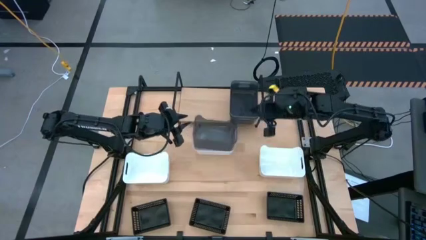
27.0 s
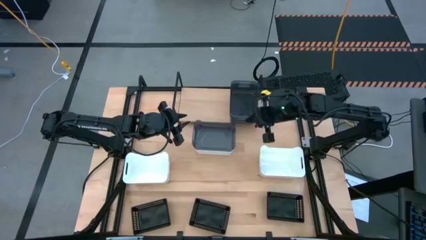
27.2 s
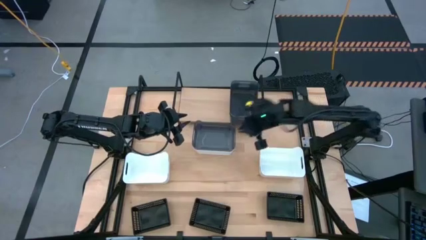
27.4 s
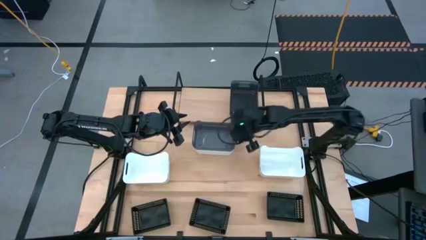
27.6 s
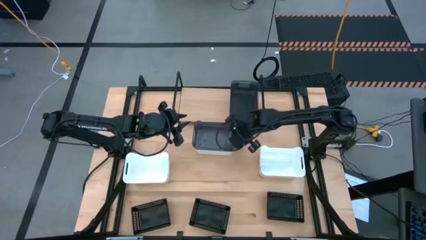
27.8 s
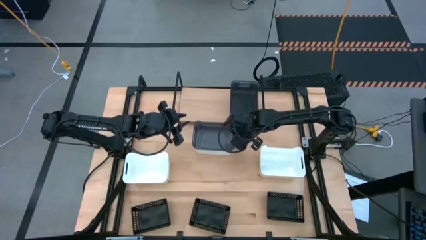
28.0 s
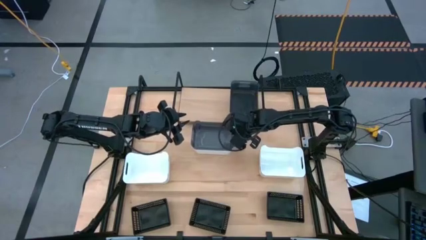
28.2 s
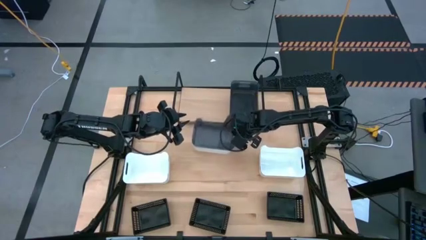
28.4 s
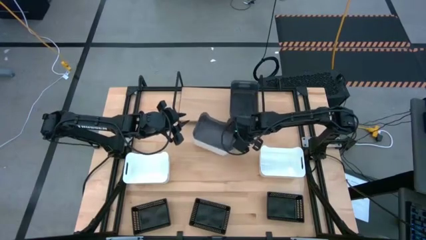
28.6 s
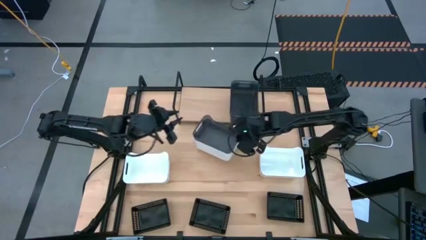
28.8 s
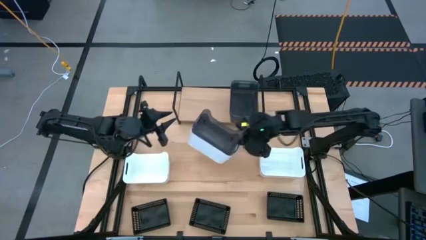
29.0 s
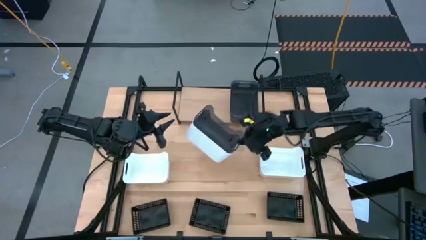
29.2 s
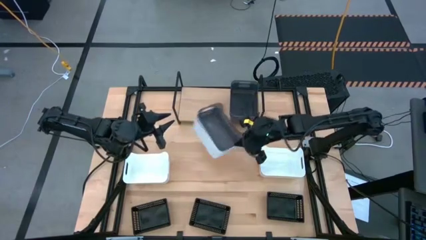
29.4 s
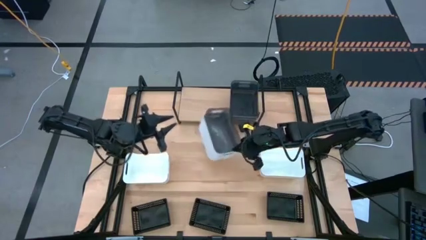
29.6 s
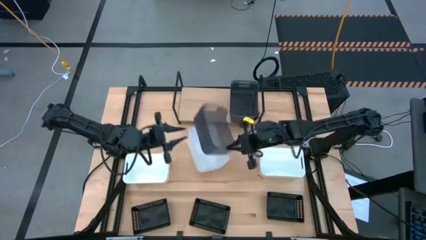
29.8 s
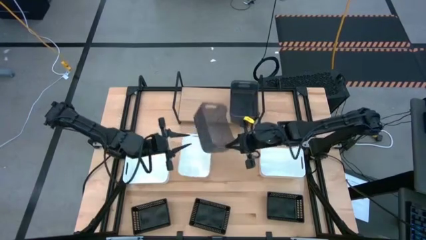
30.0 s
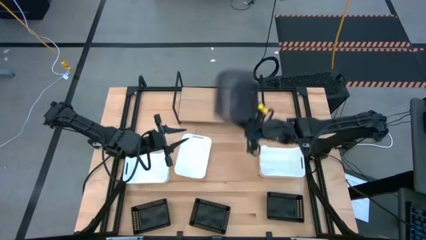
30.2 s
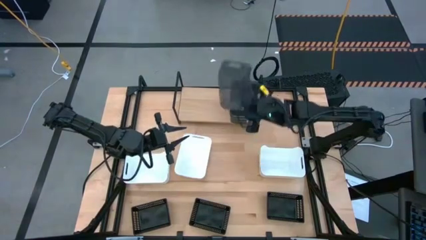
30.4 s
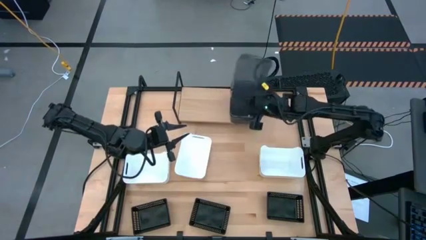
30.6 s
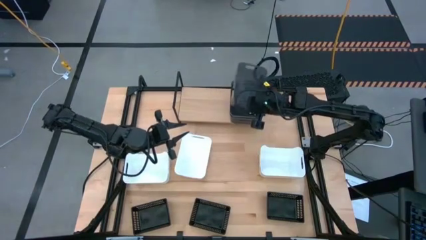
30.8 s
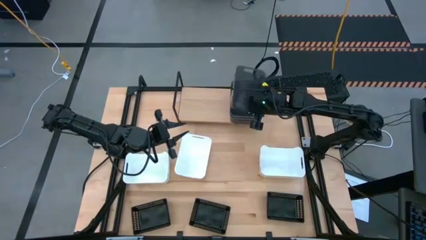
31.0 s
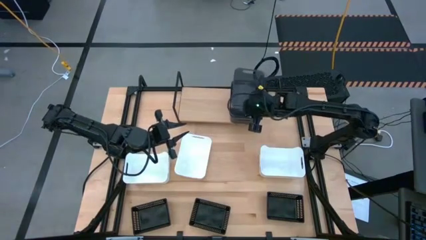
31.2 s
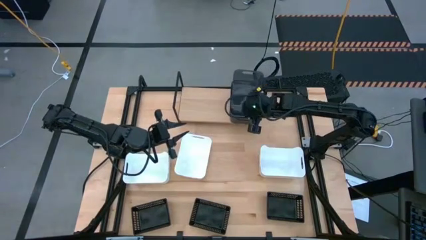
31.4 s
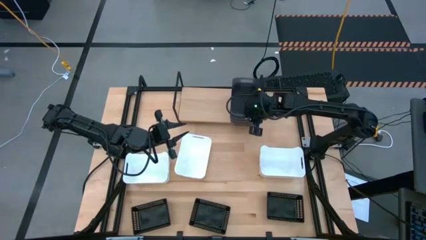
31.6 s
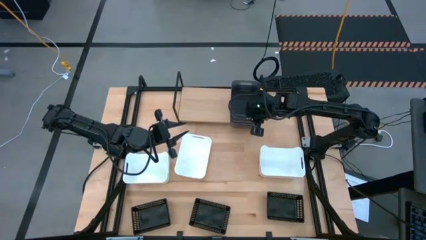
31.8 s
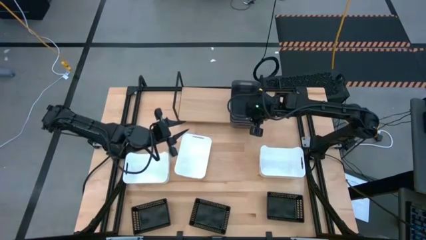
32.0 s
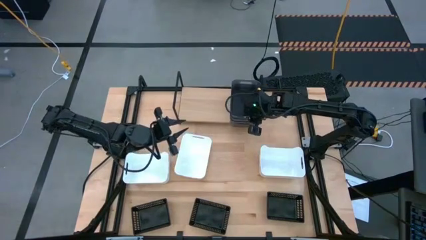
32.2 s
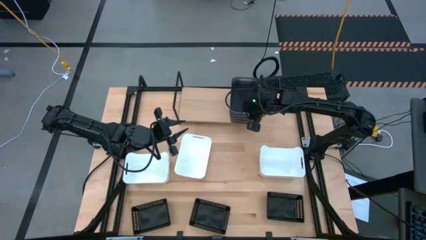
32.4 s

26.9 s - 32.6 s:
Task: Stack baskets on shelf by color
Stack the gray bin into the gray bin on the shelf

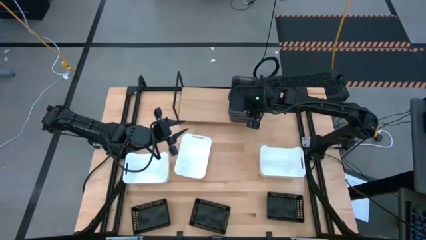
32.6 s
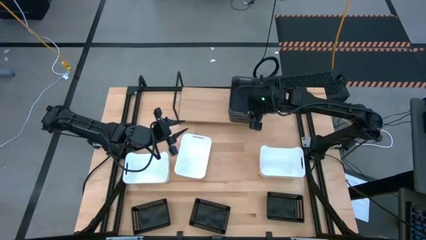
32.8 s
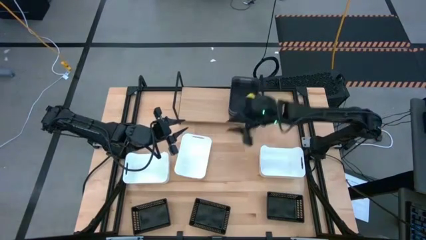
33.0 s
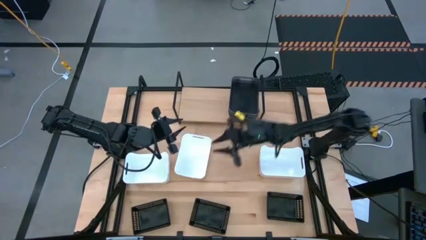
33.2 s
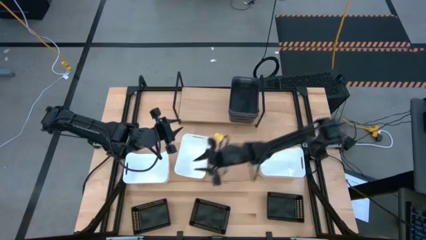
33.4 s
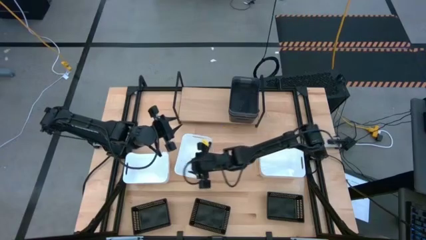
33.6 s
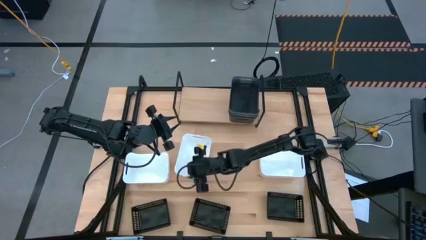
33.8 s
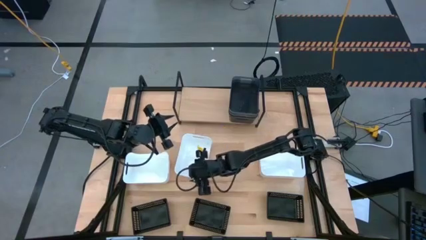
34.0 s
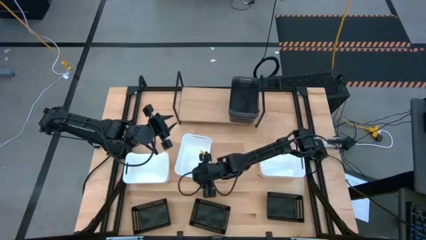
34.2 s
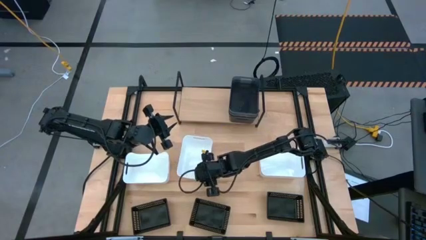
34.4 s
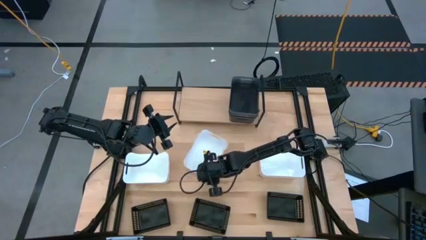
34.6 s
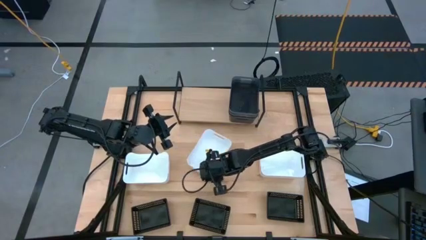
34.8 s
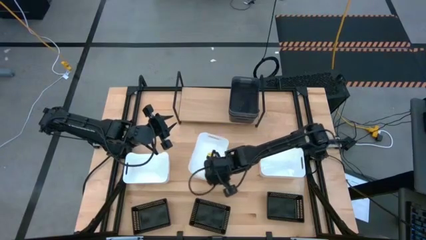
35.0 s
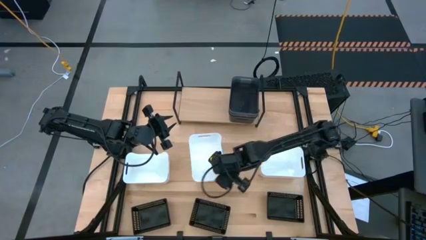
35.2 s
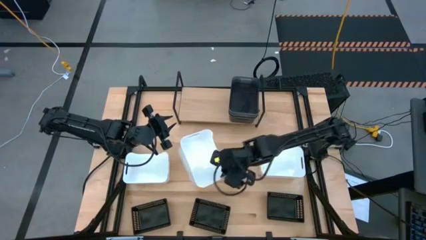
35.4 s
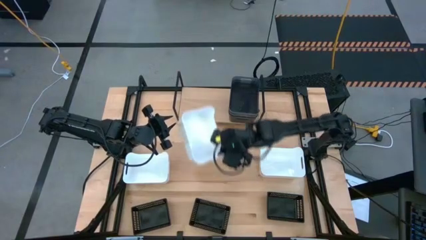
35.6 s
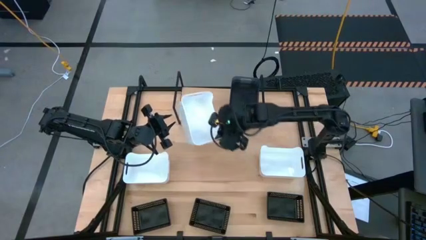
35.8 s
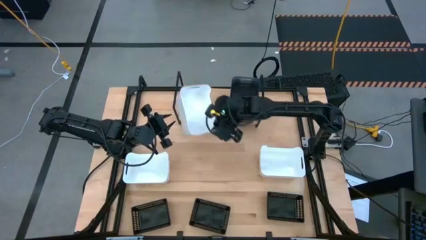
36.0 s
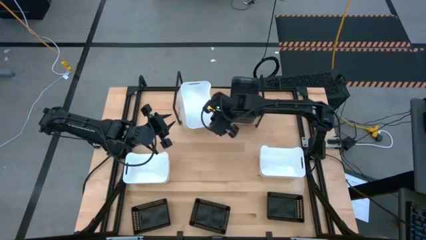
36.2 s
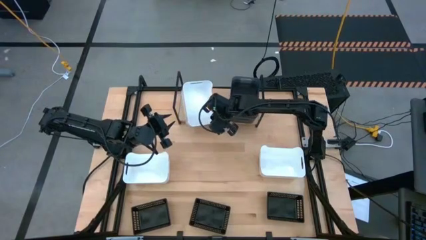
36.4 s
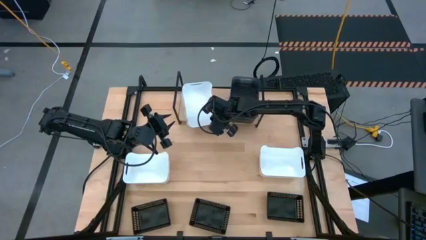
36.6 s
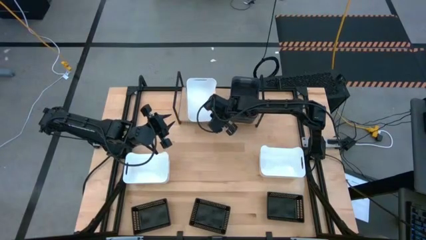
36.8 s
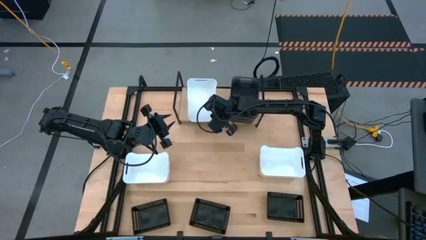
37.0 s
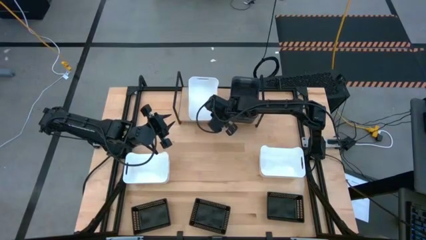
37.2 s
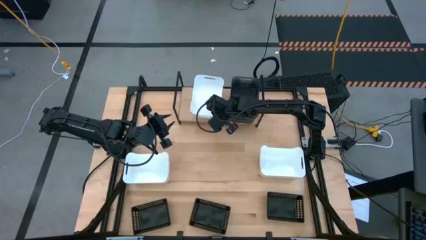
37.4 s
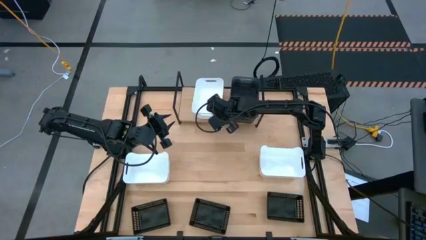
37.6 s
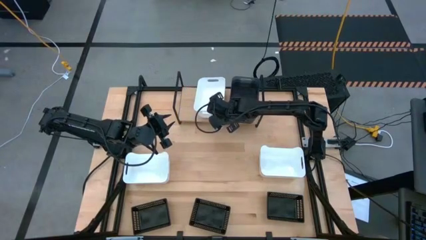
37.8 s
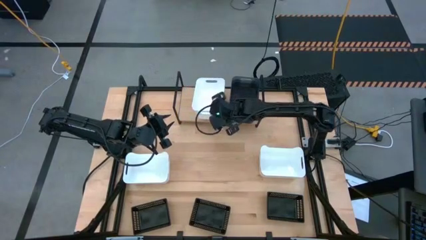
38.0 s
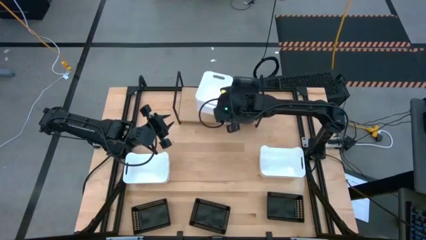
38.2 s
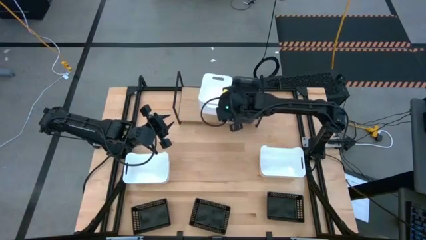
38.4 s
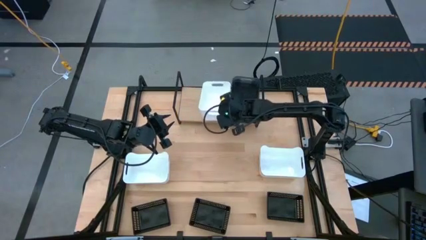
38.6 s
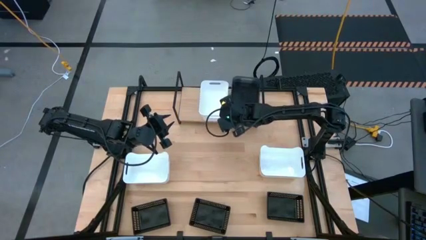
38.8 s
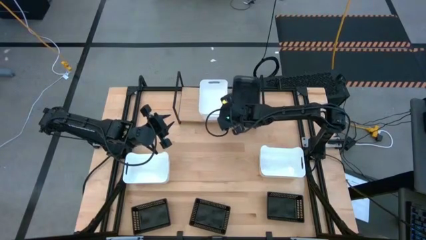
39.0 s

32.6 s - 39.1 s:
Put the center white bin on the shelf

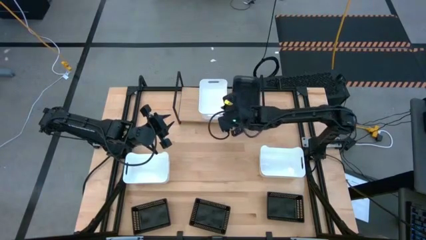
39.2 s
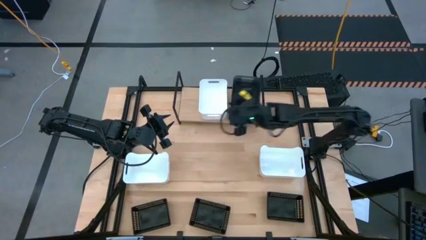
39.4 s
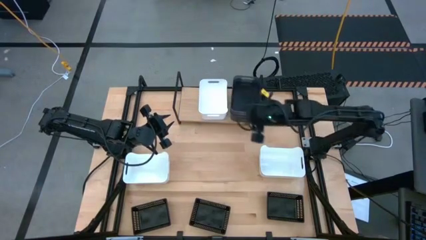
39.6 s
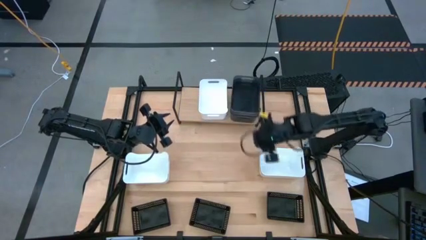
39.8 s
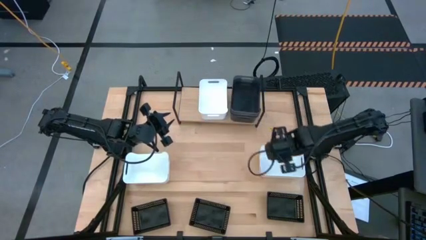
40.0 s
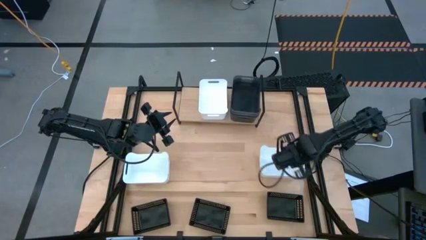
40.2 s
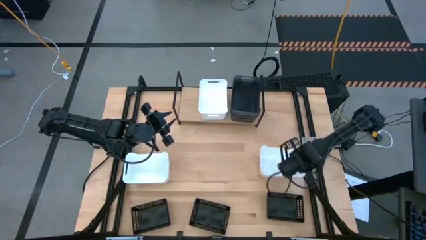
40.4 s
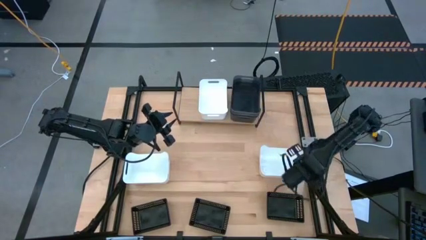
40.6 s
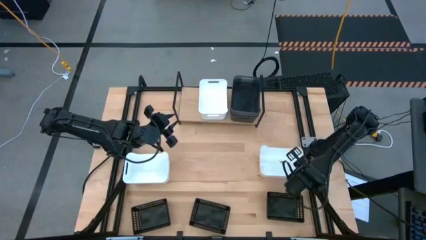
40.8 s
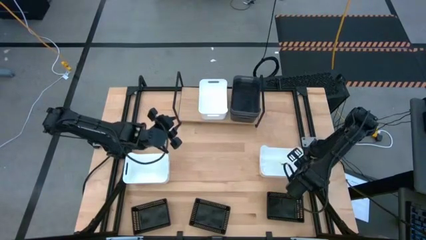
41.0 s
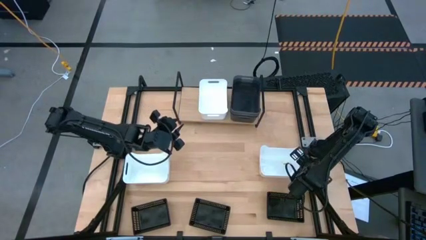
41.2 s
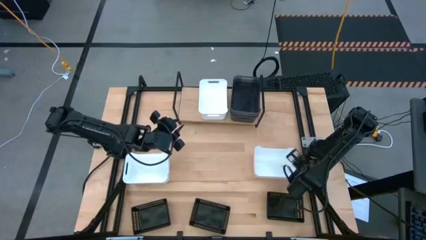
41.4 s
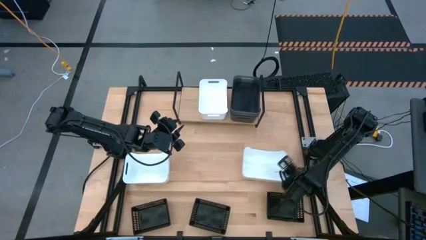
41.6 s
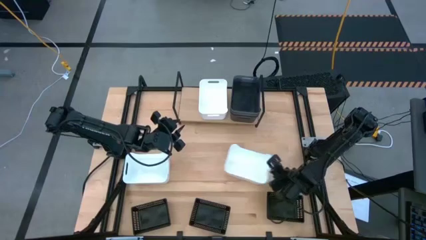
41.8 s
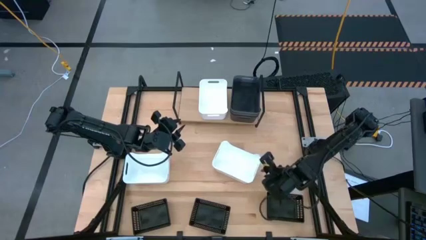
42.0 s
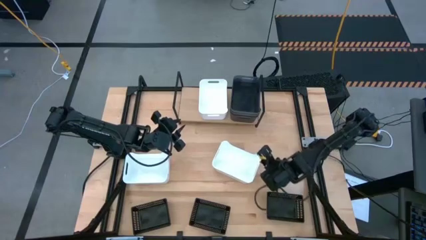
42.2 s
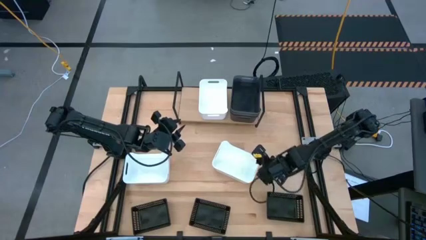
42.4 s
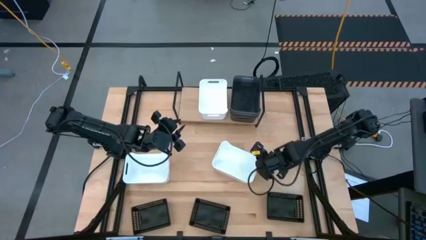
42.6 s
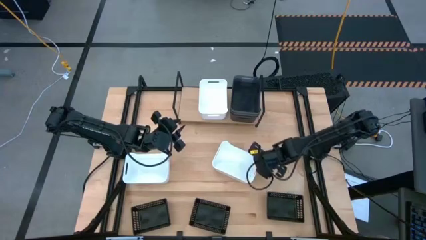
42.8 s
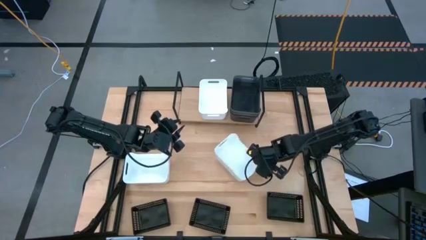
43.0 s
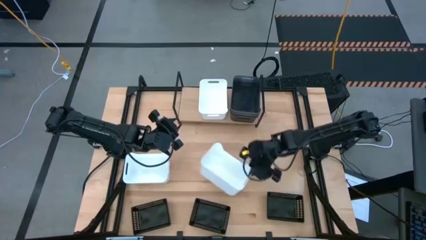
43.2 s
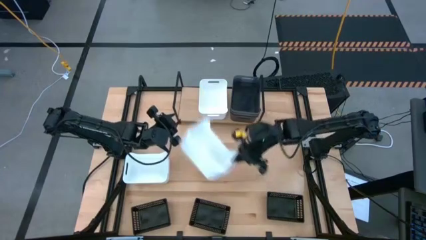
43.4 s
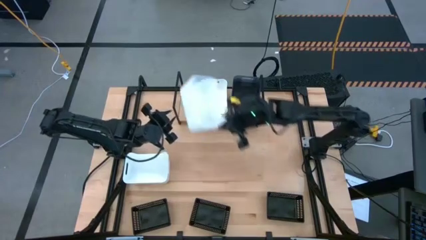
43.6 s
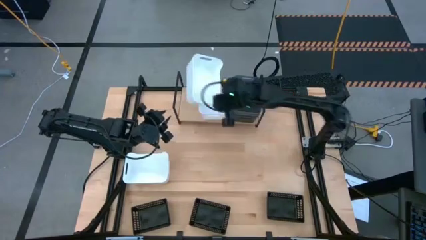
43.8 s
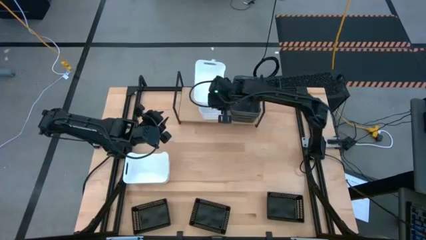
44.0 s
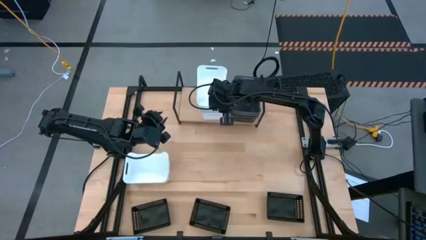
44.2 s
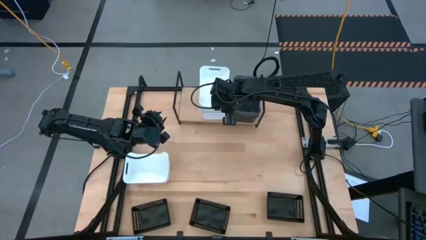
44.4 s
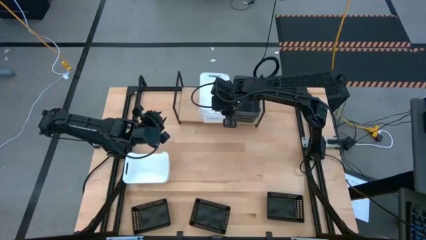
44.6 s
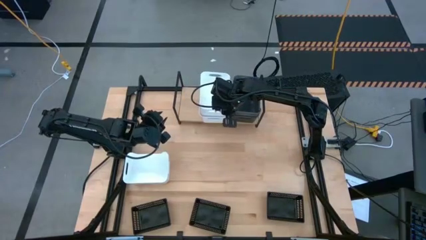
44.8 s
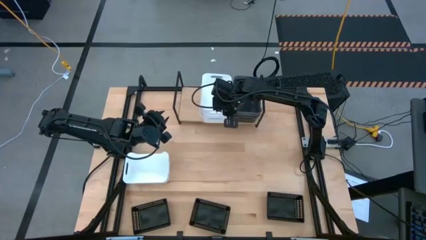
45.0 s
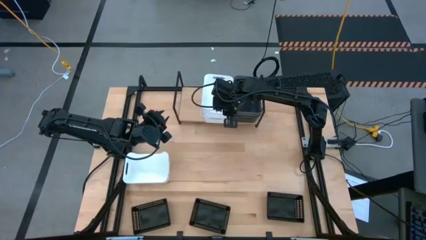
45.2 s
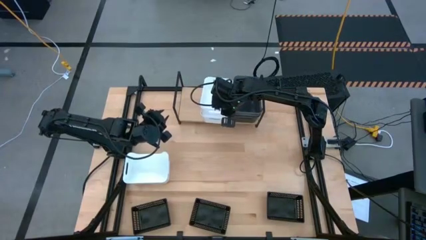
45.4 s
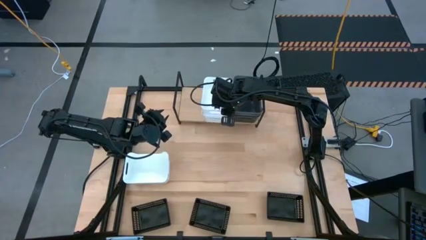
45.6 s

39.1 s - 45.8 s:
Stack the right white bin into the white bin on the shelf
